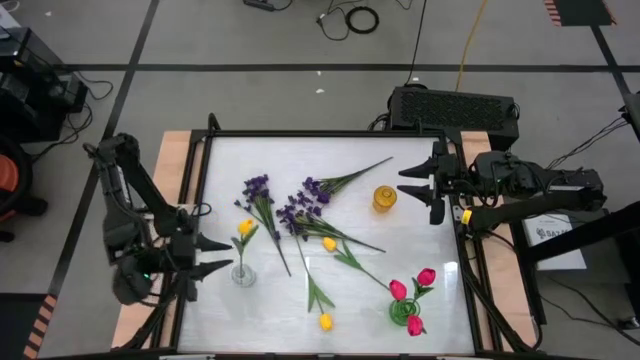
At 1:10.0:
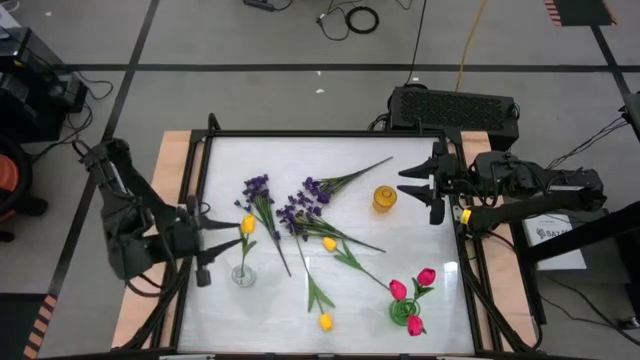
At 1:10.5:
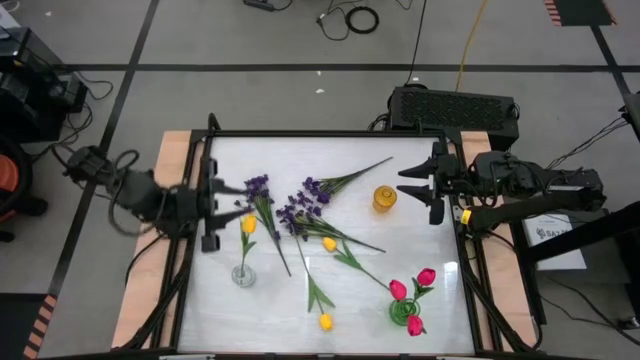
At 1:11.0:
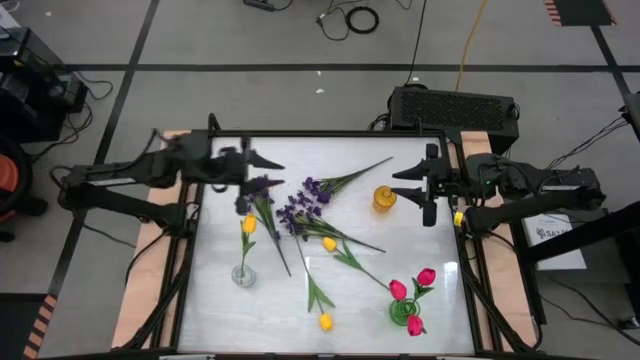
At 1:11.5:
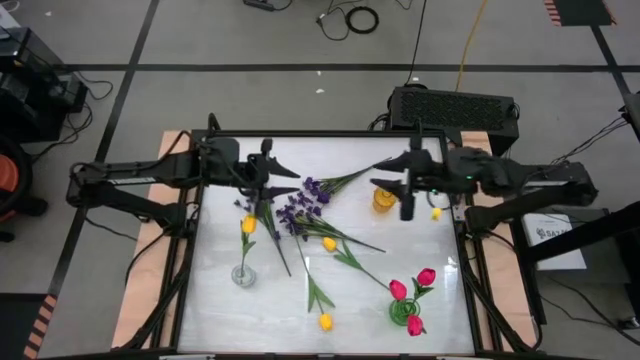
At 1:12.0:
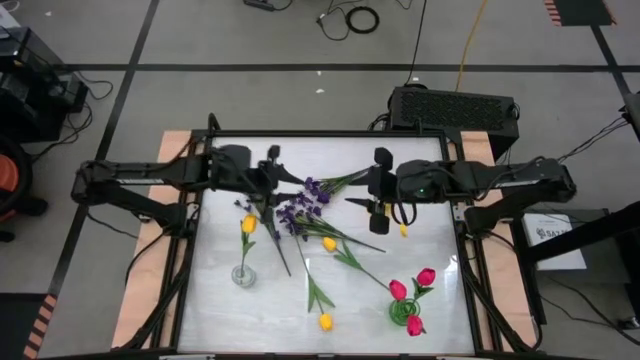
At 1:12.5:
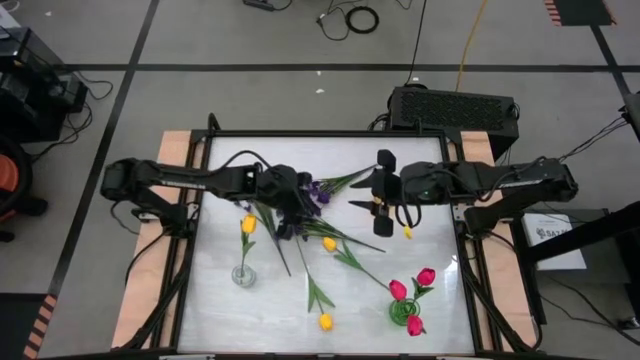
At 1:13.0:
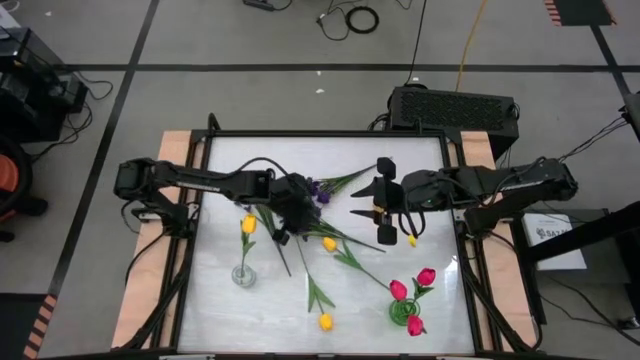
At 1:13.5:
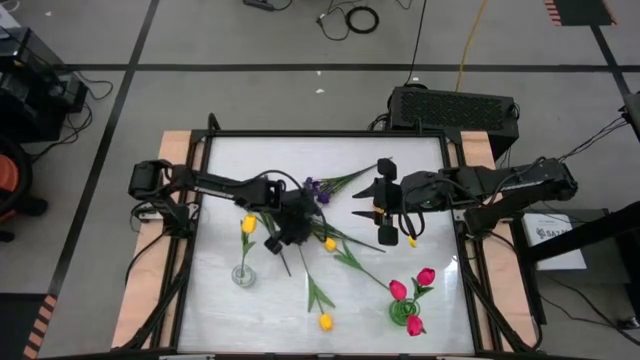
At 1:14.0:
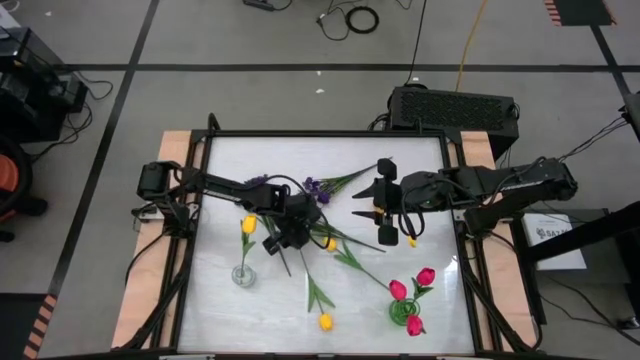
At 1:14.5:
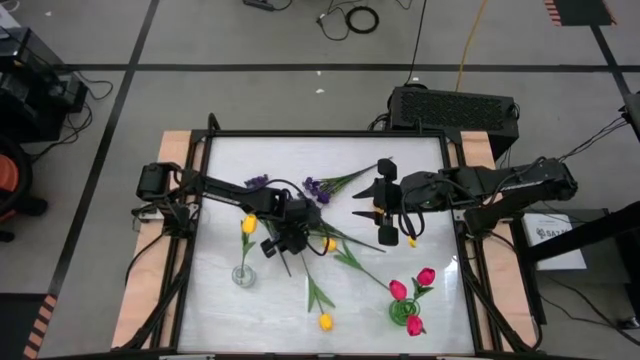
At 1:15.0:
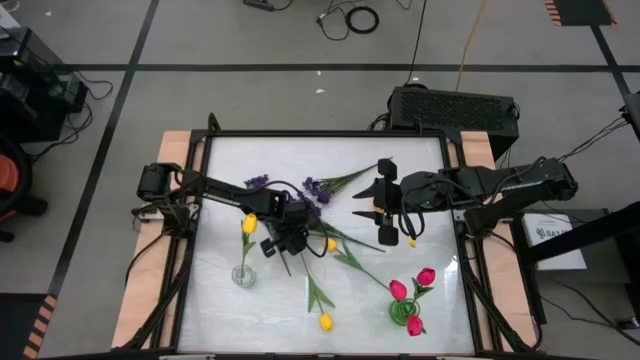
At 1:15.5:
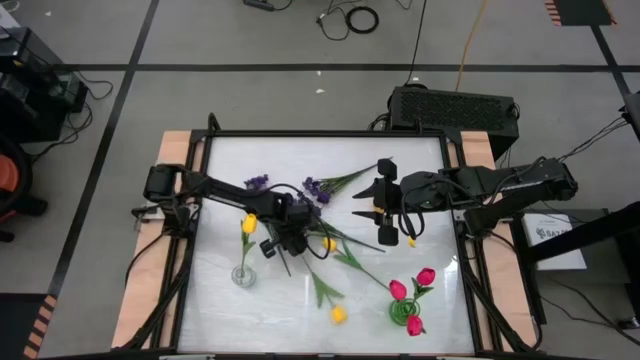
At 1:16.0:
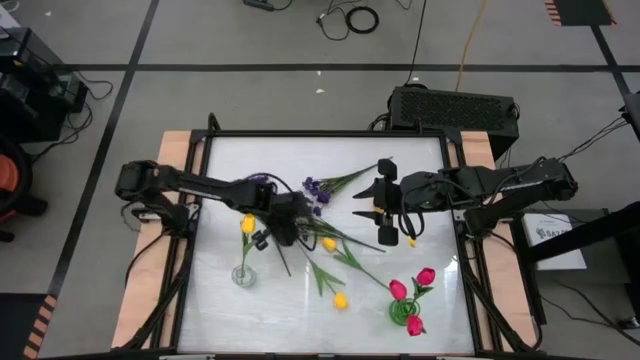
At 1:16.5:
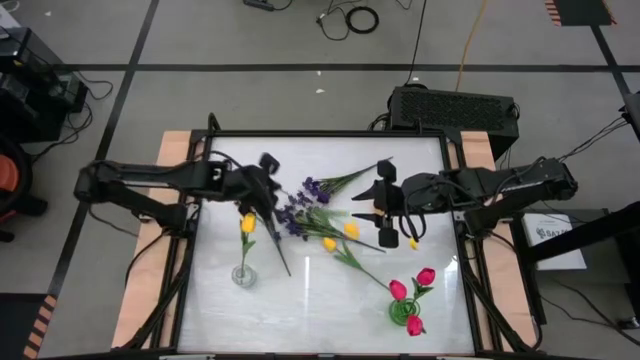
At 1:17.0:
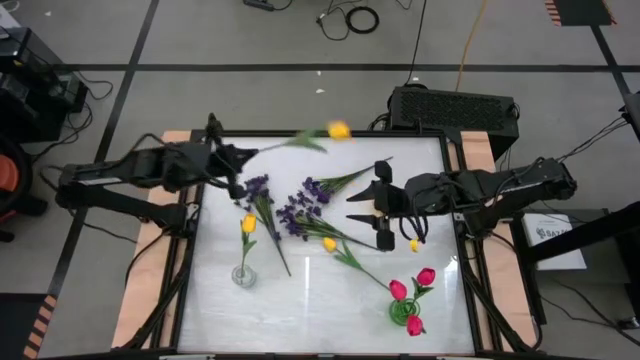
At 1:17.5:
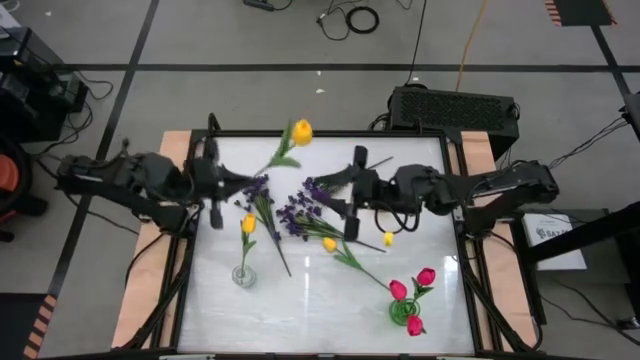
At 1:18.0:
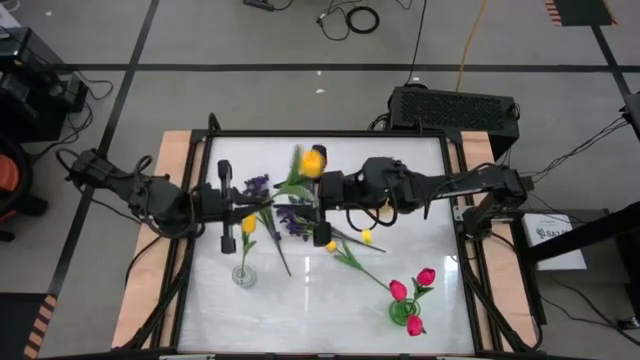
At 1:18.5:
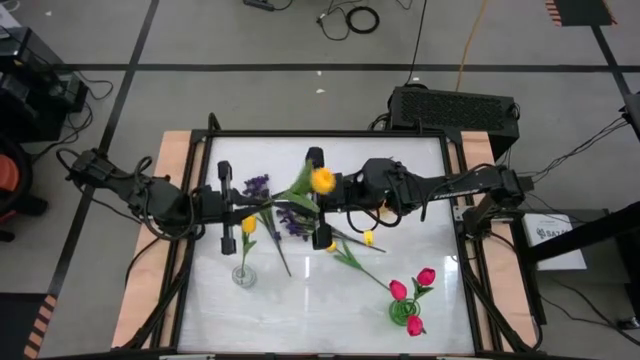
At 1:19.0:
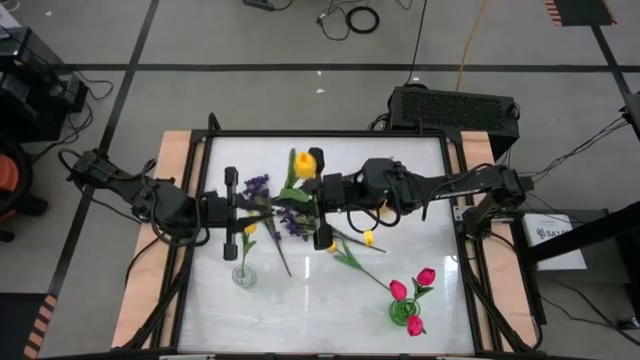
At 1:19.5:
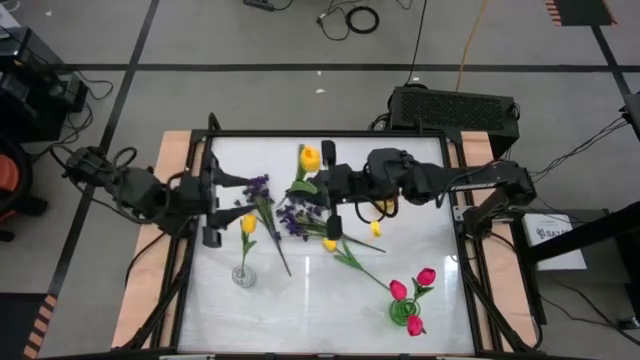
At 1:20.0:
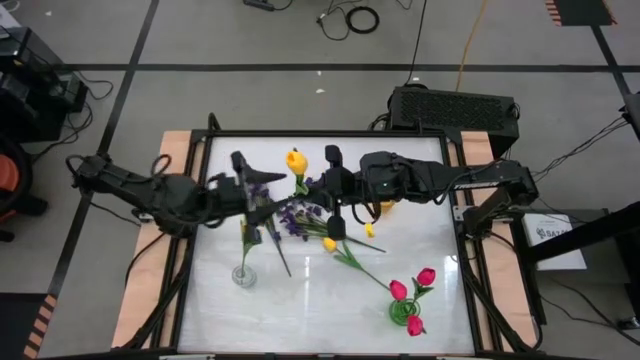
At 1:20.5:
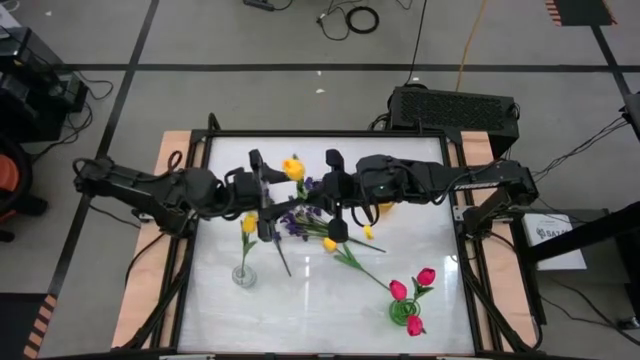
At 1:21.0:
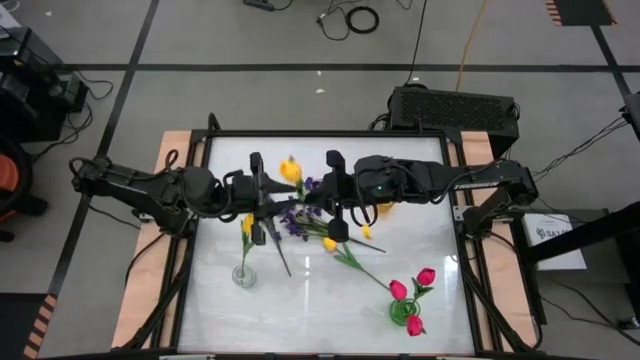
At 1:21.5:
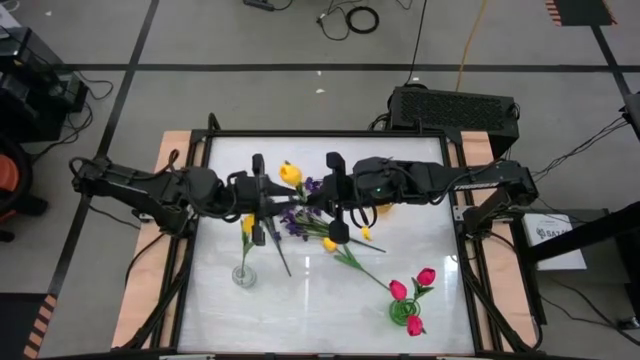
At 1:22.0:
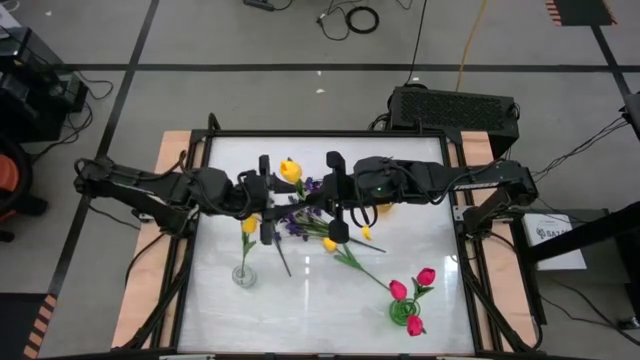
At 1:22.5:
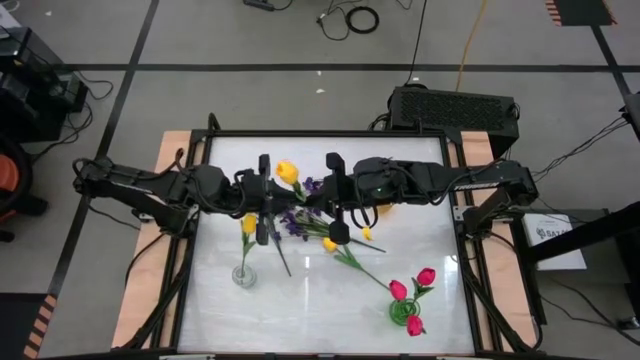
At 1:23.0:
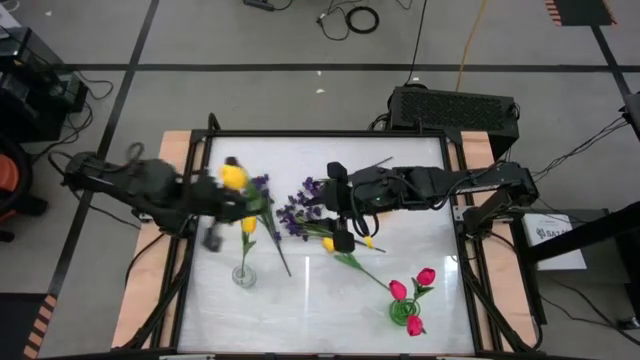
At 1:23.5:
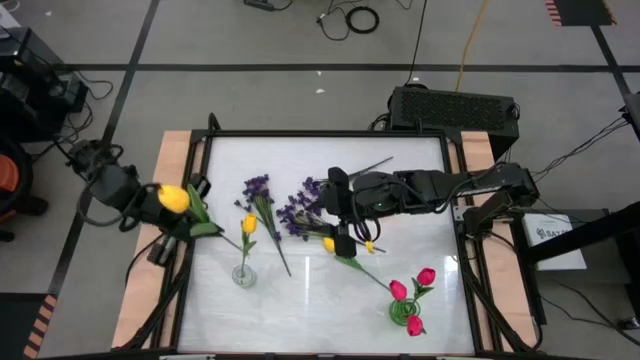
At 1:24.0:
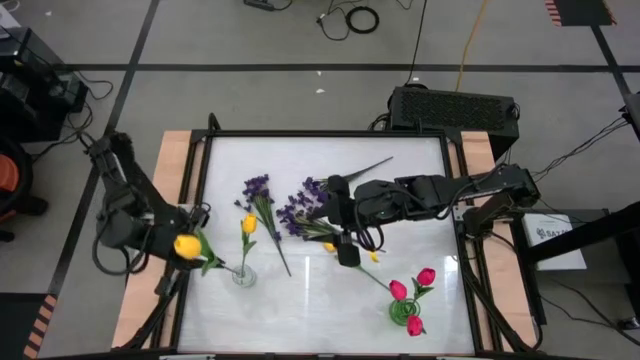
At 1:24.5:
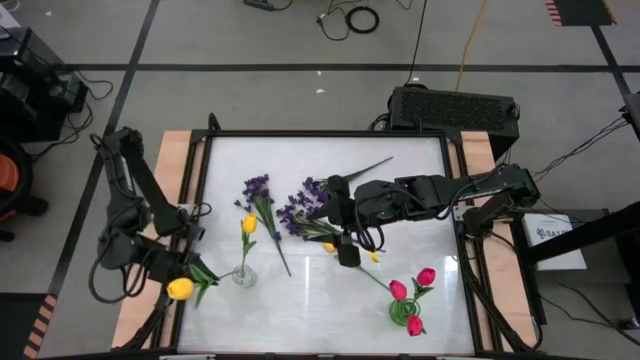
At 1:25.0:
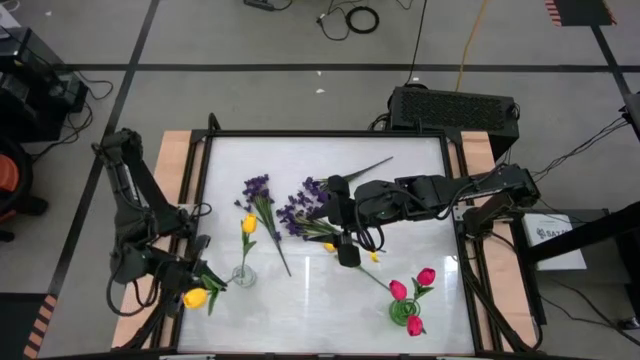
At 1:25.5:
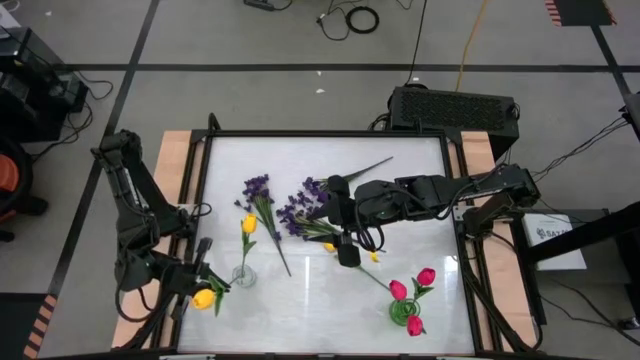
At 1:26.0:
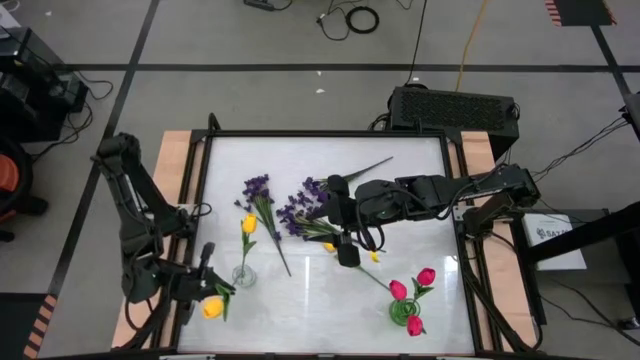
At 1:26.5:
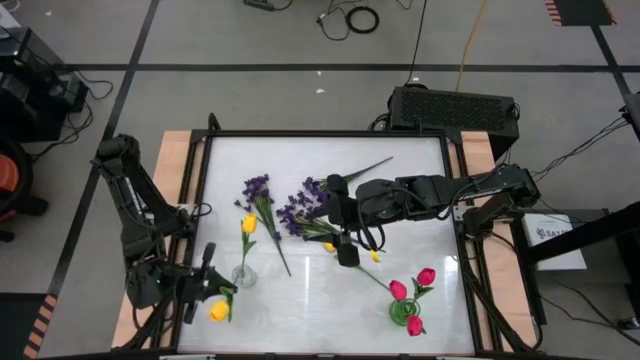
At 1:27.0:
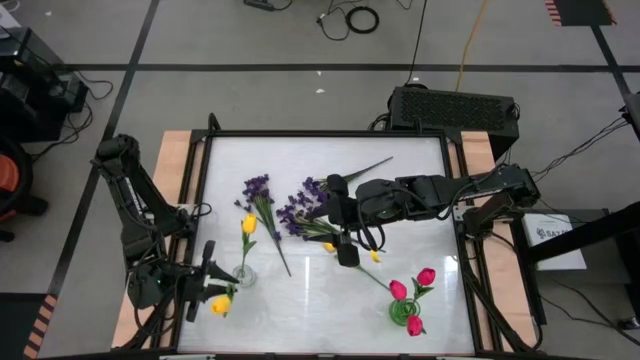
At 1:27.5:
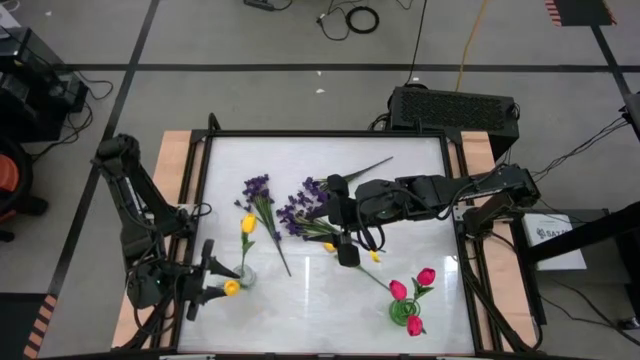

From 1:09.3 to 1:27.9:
Task: Sort flowers into vase by color
Put the bottom yellow flower into the transparent vase

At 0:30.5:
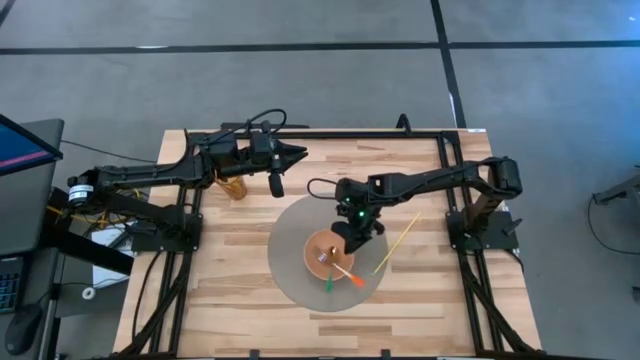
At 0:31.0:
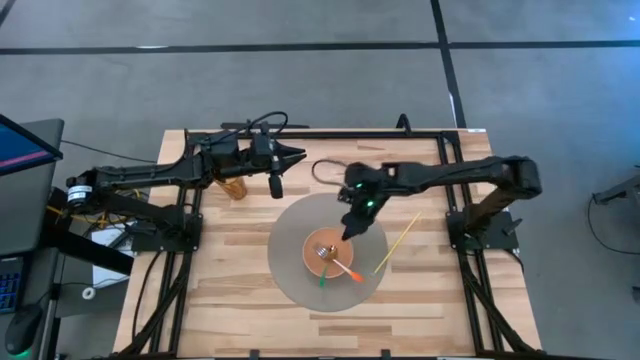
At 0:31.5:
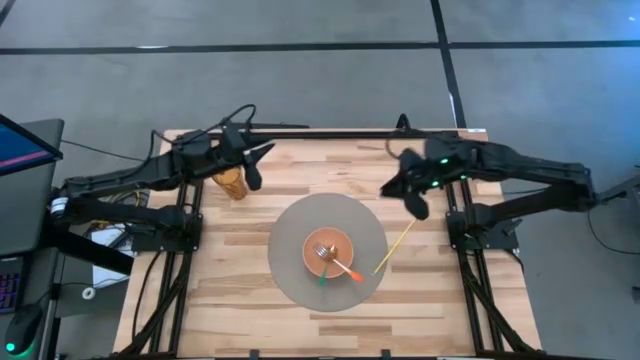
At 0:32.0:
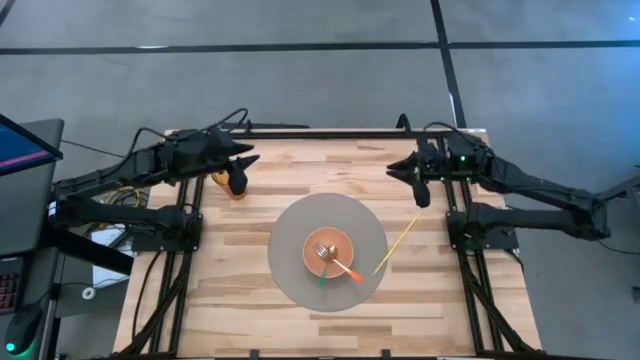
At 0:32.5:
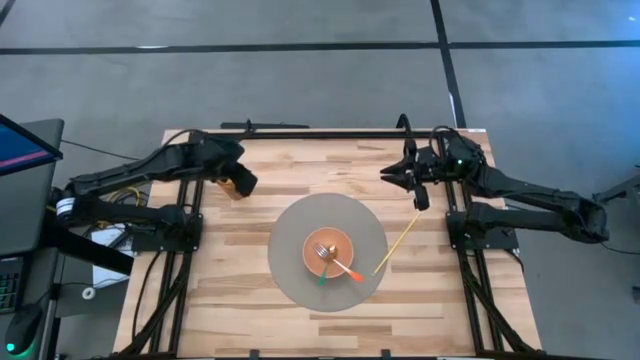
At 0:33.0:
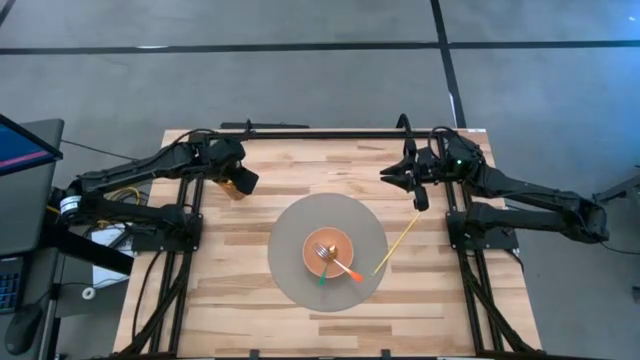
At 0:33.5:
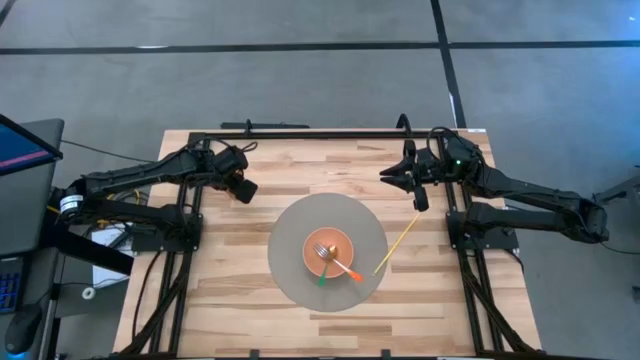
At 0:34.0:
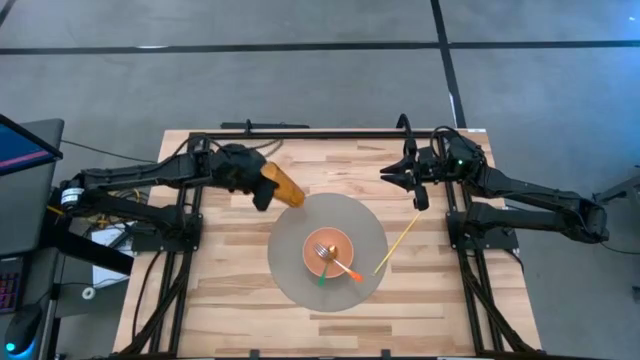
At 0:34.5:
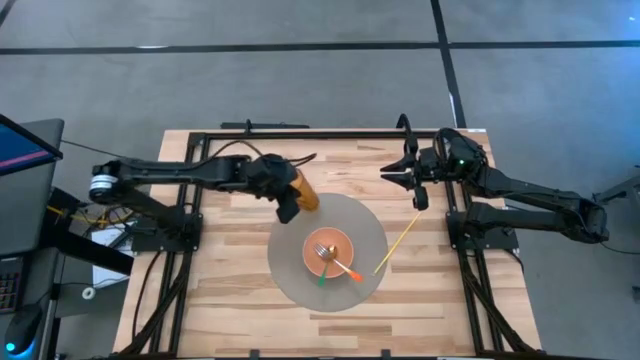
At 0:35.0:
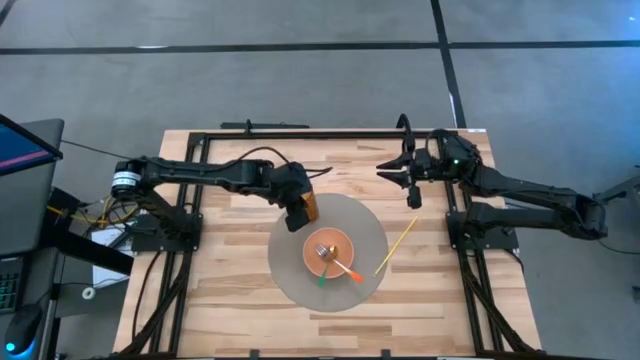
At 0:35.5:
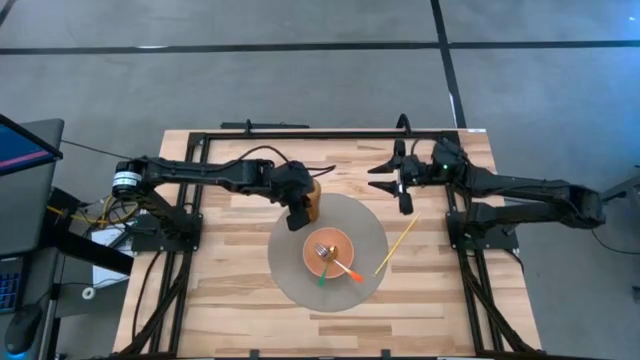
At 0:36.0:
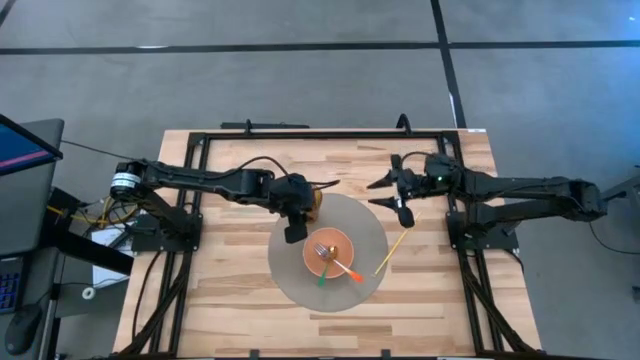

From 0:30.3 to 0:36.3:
Task: Pick & Place Utensil
Put the brown cup on the tablemat to the top left of the pink bowl
